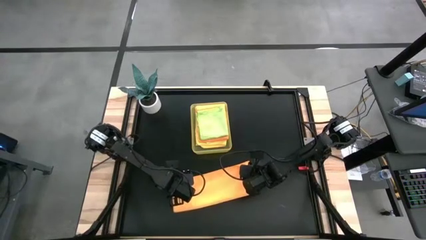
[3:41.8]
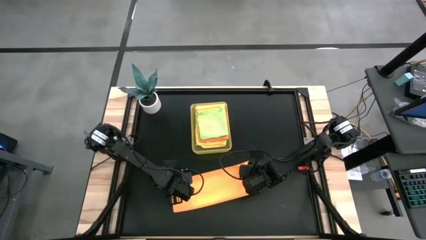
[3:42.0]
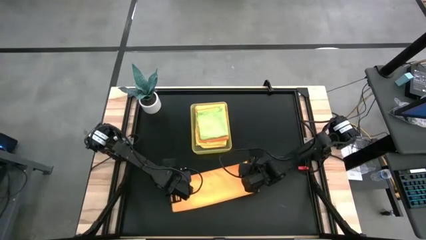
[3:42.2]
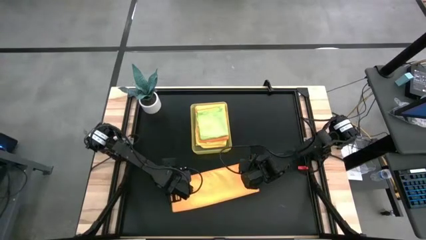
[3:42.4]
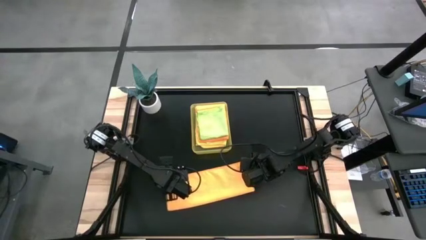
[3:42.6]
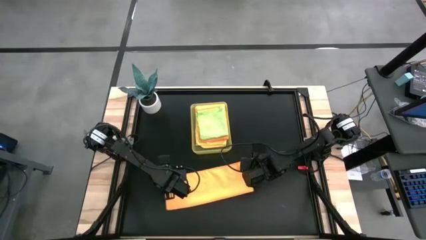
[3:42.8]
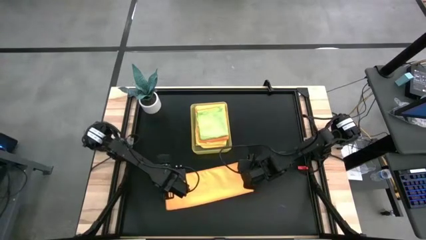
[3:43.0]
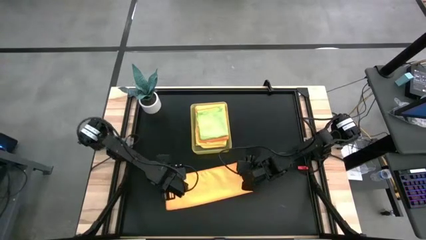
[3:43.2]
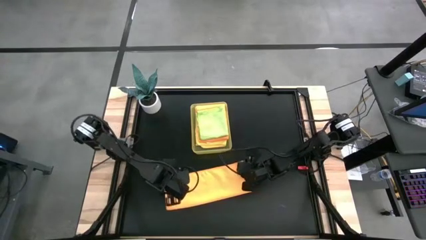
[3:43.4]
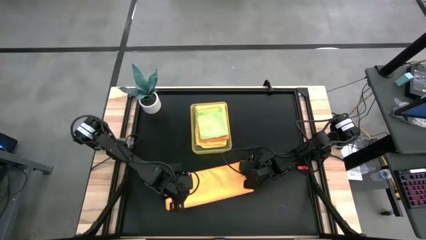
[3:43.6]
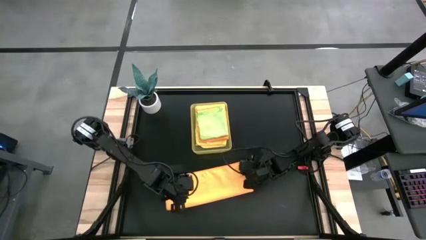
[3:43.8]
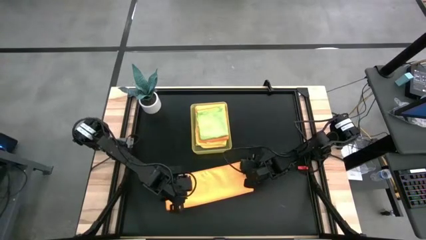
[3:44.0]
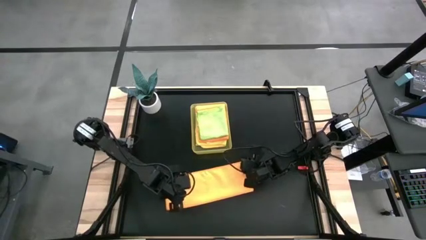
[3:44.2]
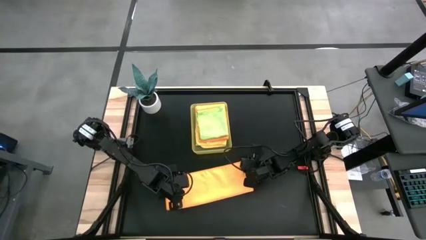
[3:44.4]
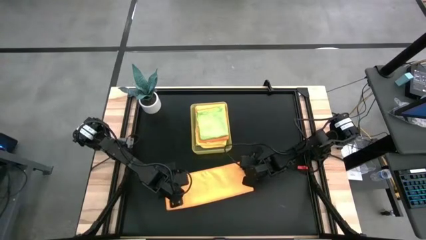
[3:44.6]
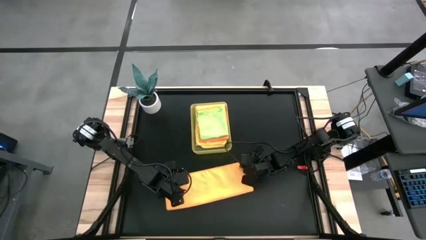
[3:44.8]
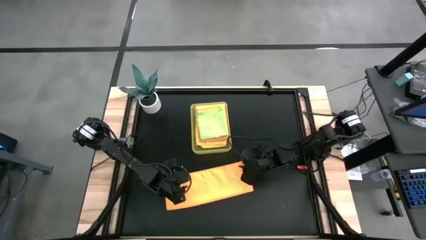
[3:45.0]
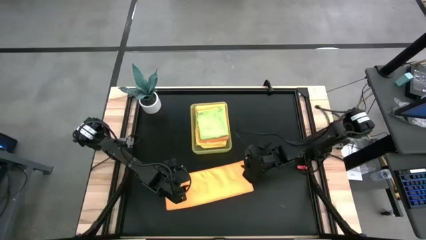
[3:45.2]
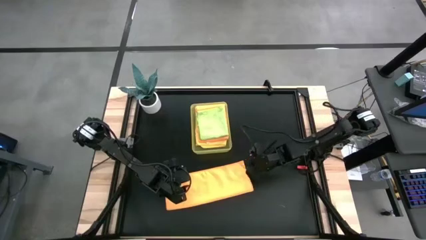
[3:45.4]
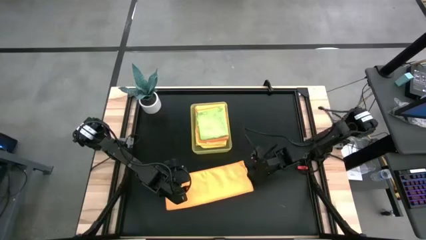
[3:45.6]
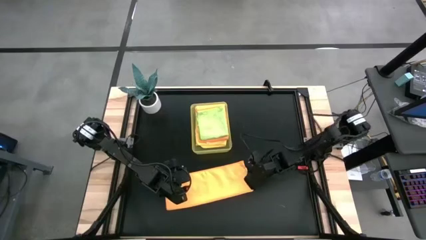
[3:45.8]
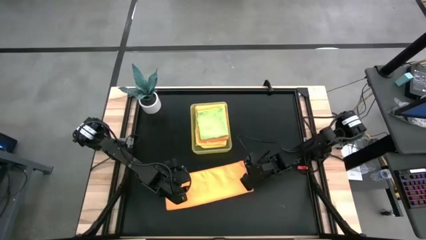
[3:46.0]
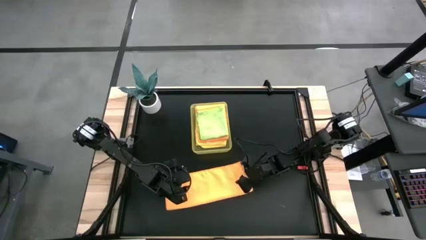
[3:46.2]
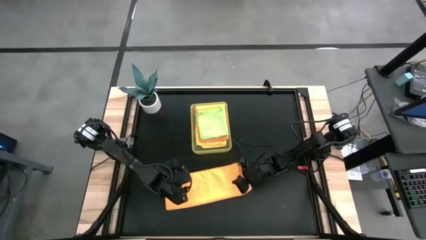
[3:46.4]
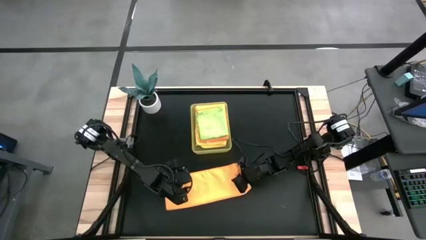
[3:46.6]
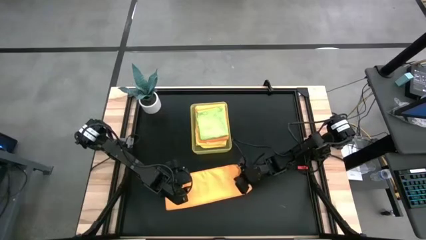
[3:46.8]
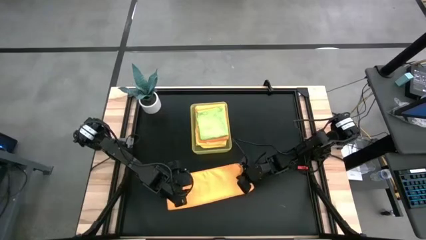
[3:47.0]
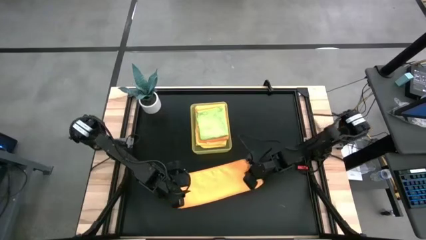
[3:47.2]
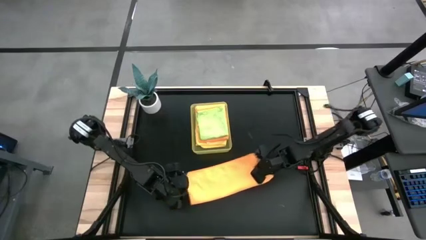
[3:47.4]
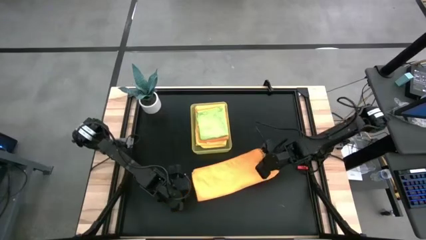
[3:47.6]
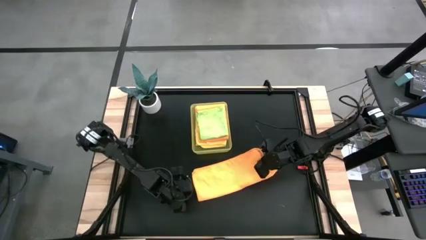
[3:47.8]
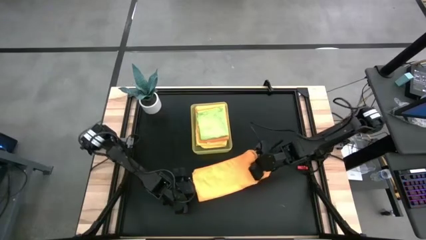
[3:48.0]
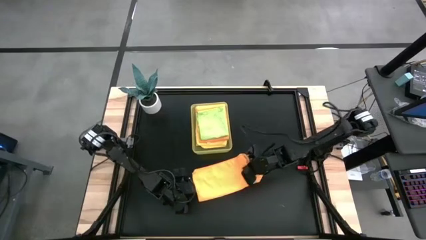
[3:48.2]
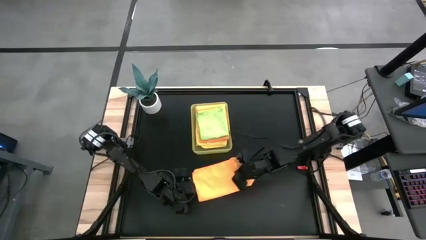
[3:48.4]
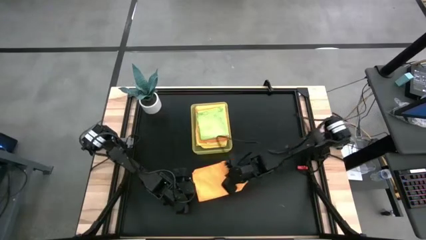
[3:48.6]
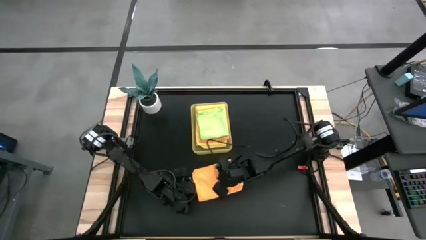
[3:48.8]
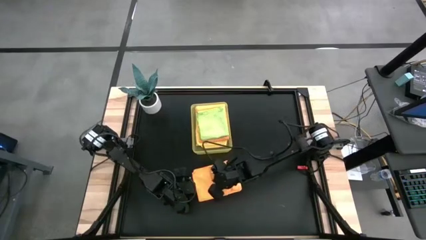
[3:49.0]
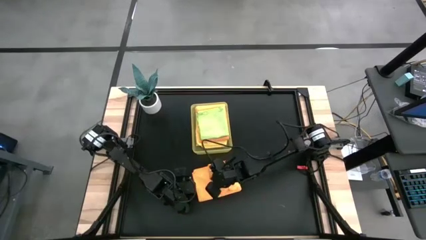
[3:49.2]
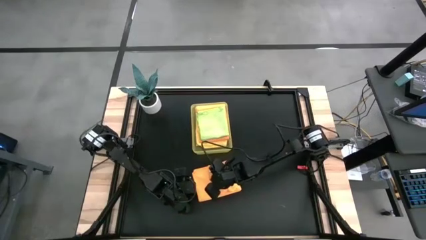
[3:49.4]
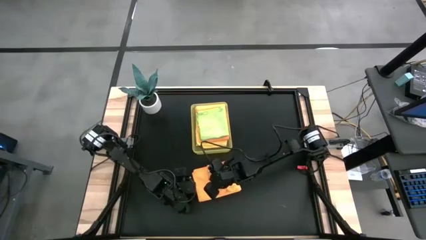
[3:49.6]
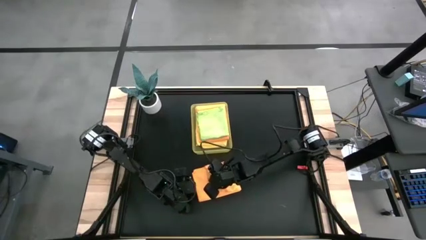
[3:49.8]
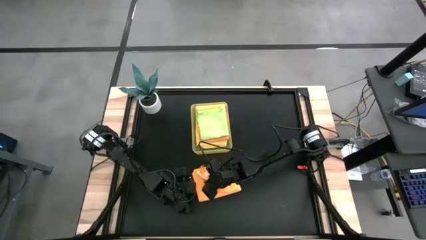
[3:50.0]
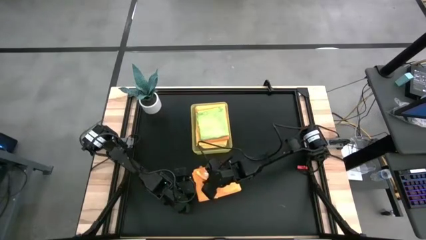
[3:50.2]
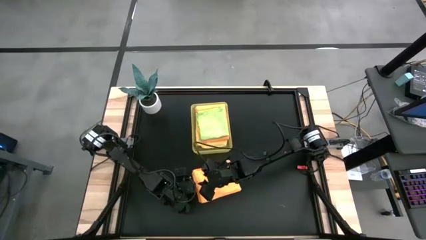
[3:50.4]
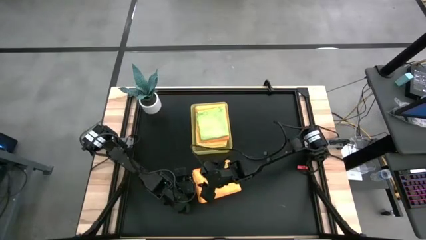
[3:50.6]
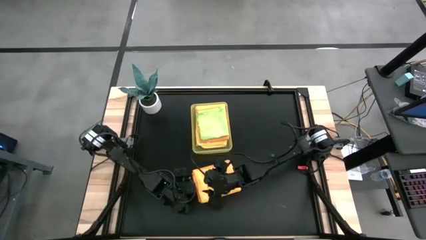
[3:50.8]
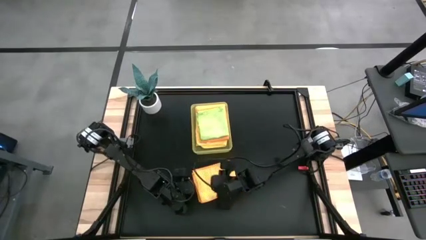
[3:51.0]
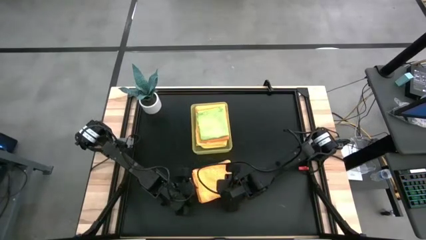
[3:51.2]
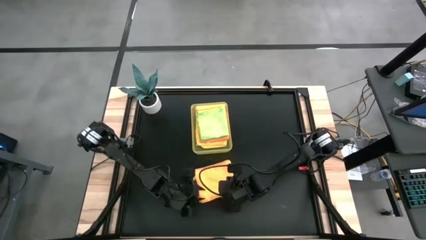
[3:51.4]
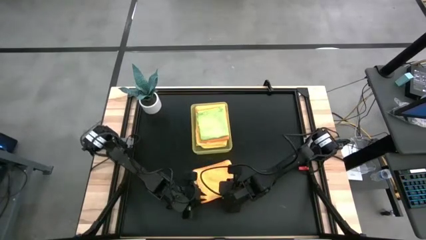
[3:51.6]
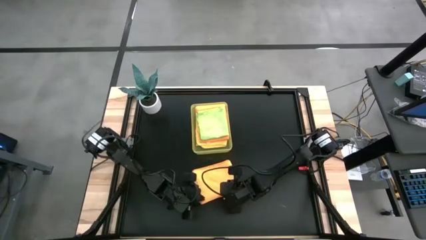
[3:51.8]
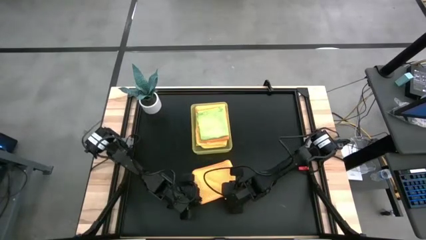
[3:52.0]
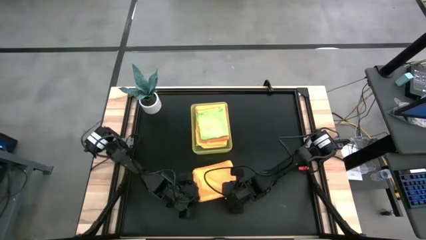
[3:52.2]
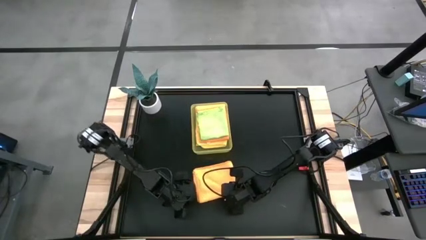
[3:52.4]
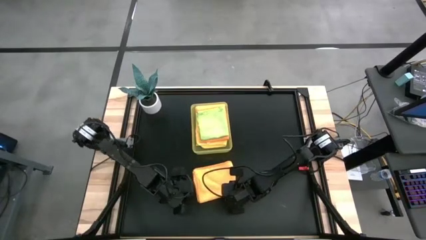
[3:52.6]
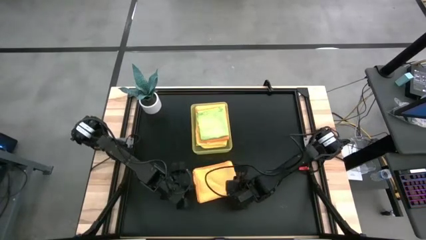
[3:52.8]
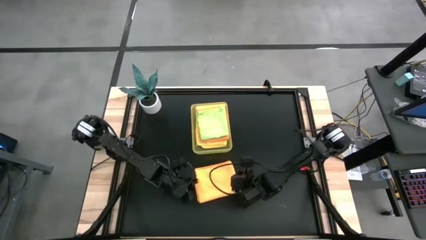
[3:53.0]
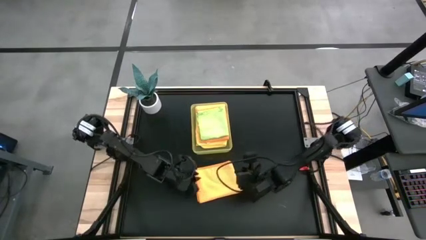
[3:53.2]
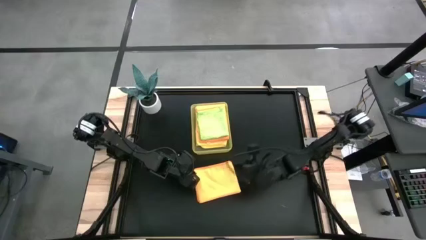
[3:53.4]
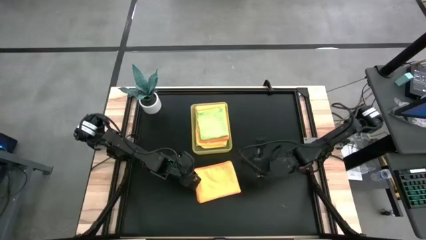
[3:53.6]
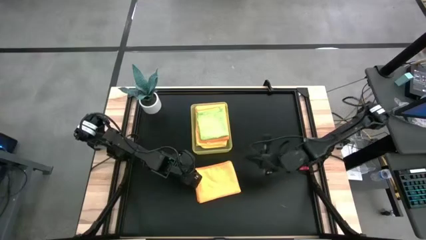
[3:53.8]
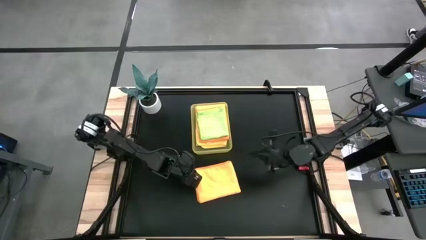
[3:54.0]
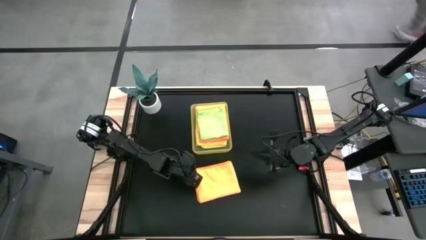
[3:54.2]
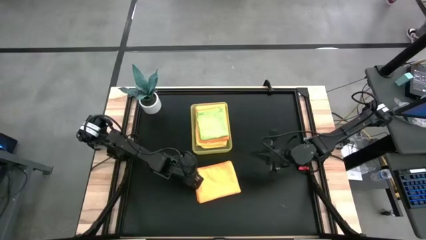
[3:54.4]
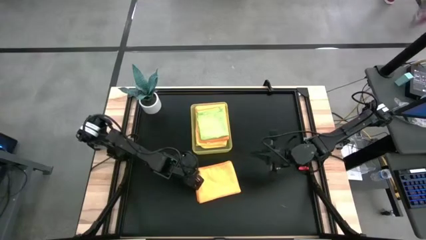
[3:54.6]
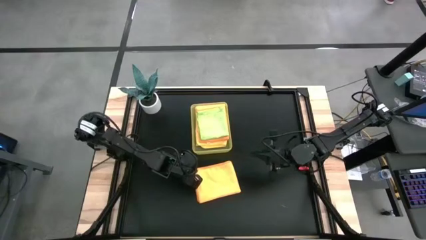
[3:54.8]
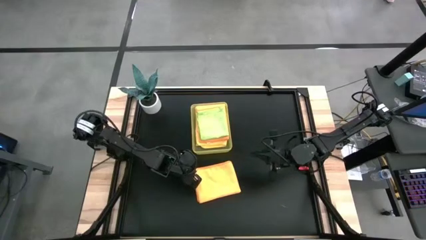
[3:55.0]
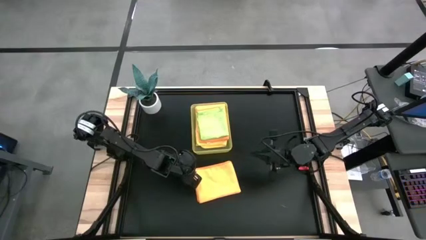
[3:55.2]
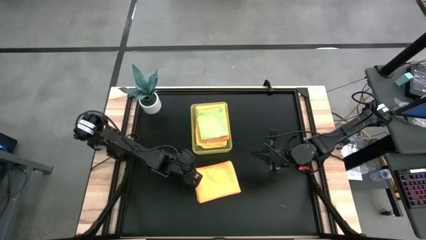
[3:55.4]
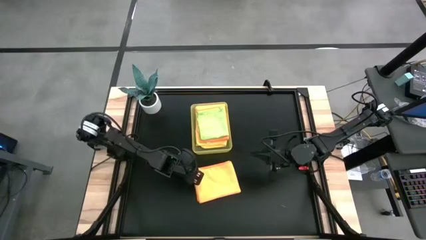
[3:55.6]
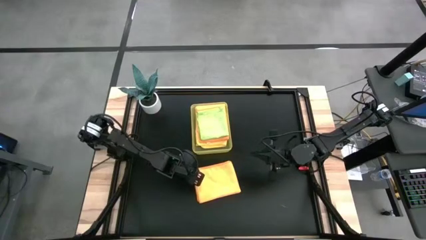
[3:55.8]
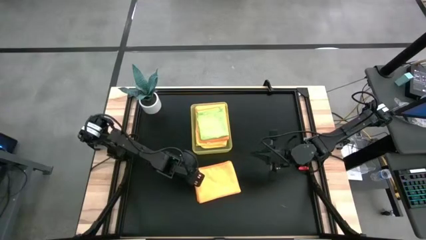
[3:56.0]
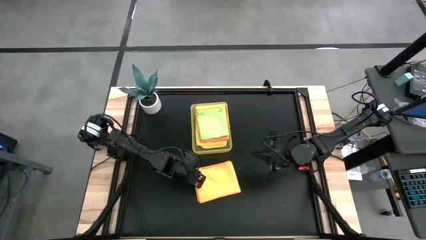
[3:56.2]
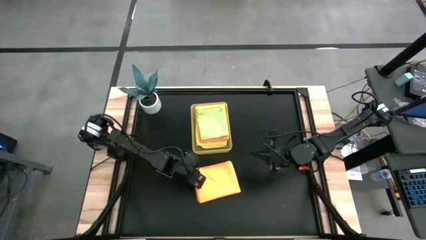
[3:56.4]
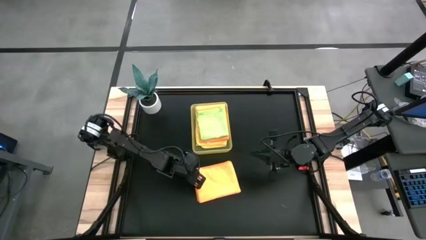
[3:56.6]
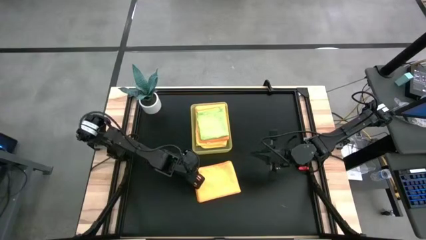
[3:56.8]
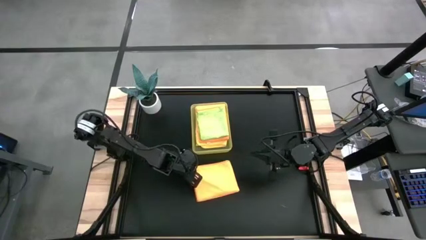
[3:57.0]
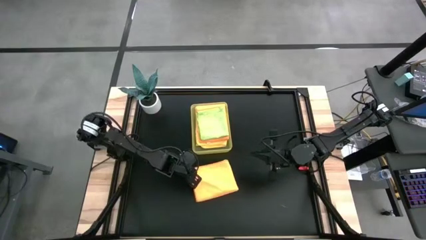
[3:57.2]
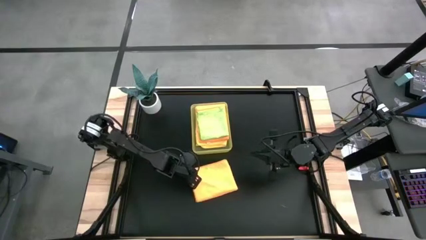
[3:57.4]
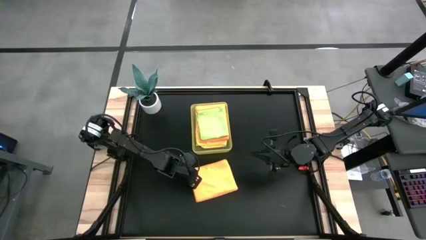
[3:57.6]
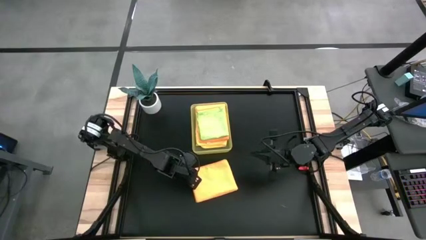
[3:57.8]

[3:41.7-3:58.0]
Task: Fold microfiber towels
Fold the orange microfiber cloth

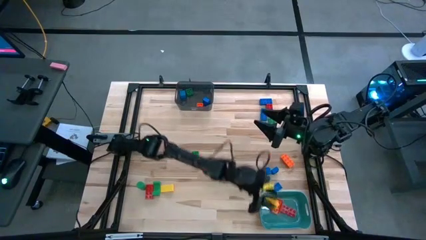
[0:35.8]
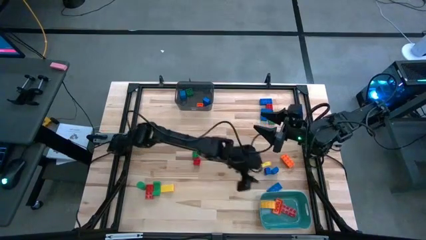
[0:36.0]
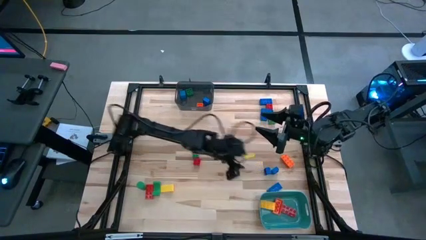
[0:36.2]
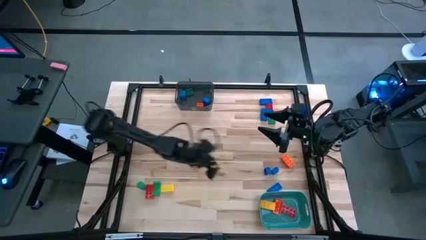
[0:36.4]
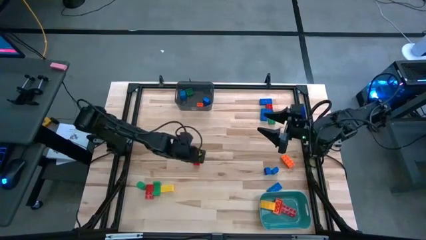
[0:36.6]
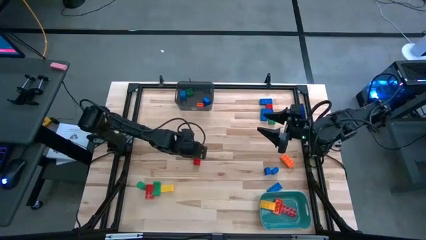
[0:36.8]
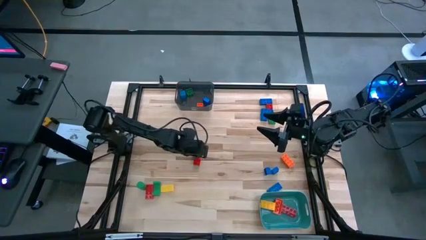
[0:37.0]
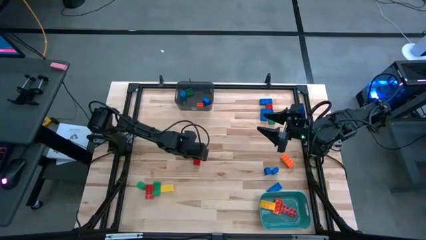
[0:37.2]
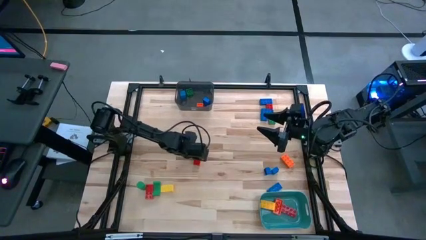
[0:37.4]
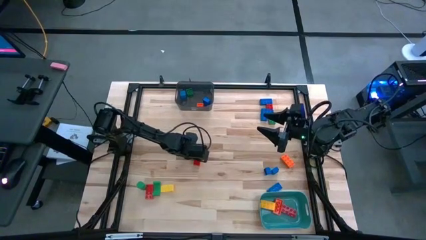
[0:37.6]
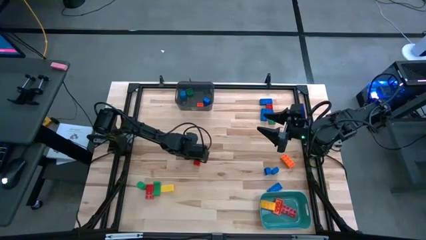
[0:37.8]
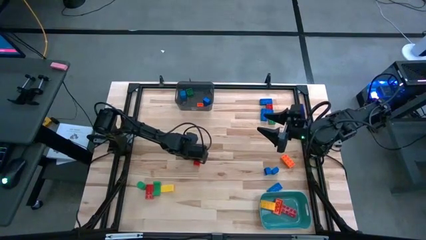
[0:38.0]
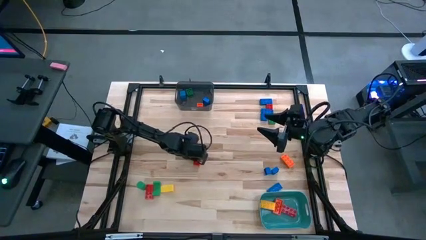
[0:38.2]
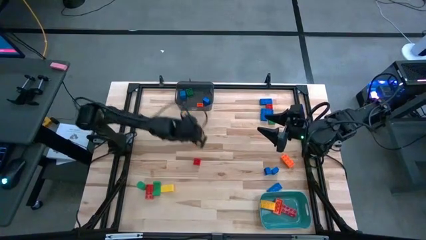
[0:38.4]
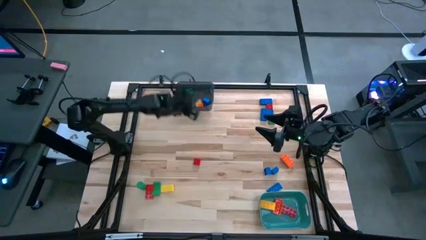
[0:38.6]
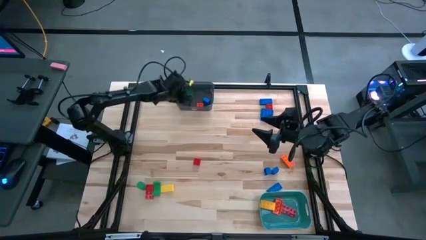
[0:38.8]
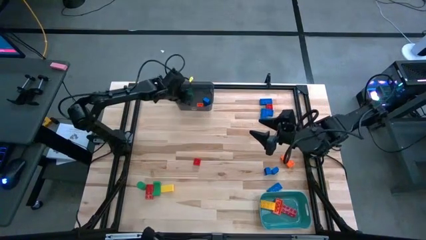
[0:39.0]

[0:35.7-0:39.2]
Task: Sort blocks by size
Put the green piece into the black bin
